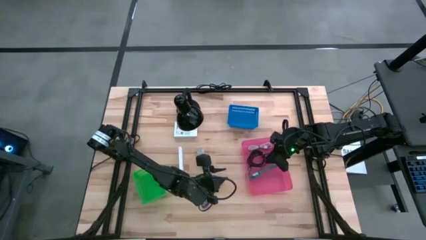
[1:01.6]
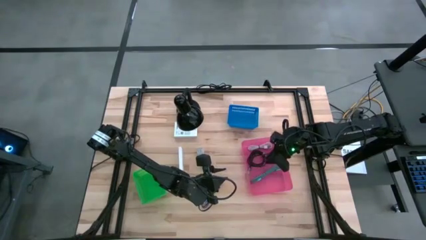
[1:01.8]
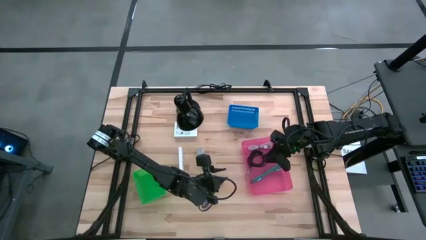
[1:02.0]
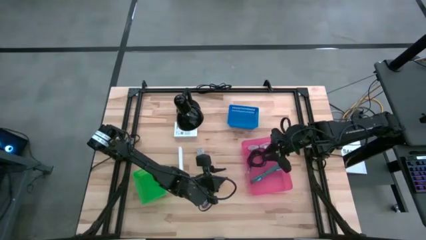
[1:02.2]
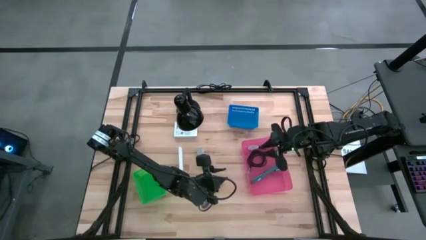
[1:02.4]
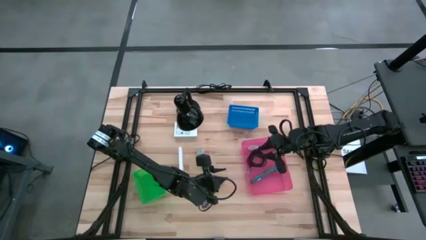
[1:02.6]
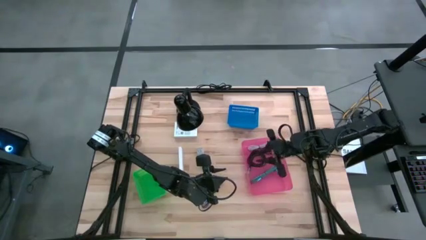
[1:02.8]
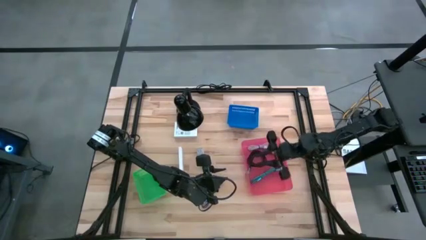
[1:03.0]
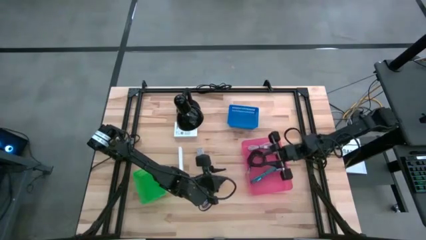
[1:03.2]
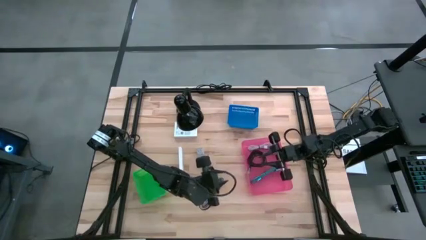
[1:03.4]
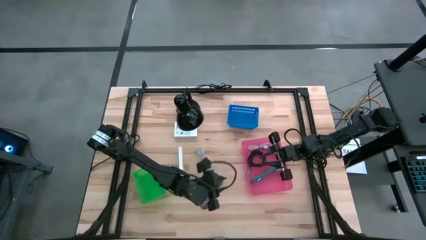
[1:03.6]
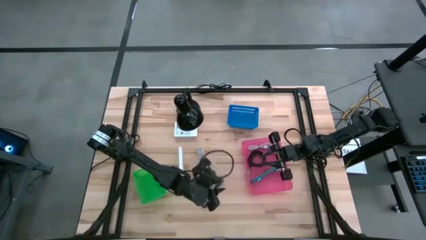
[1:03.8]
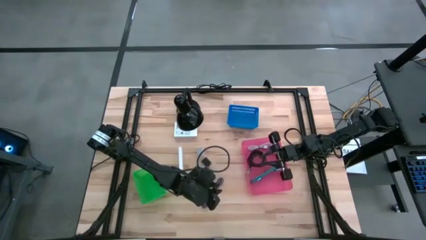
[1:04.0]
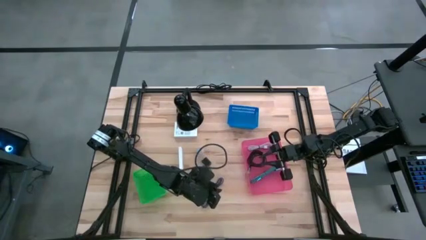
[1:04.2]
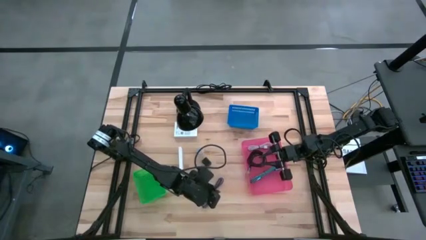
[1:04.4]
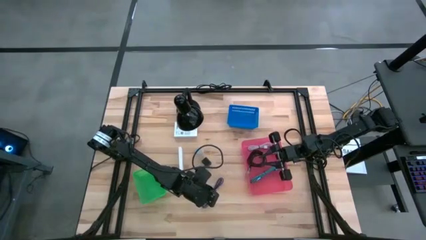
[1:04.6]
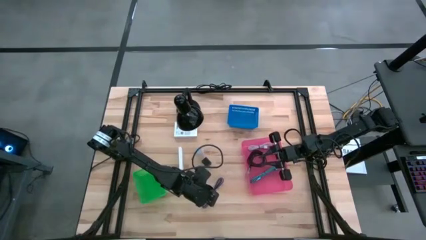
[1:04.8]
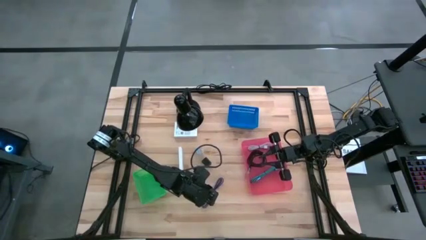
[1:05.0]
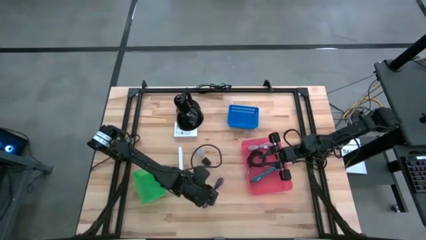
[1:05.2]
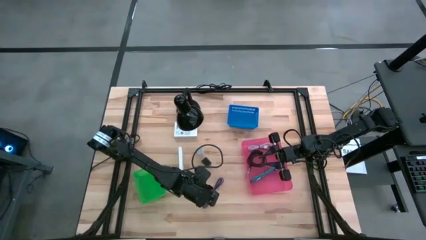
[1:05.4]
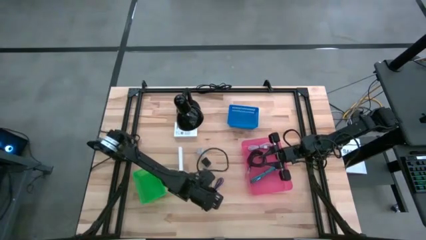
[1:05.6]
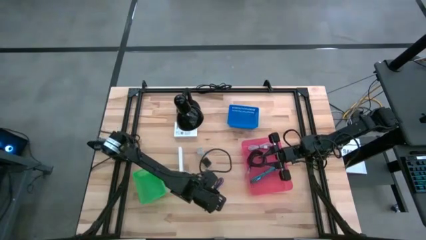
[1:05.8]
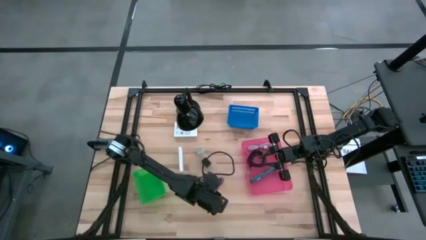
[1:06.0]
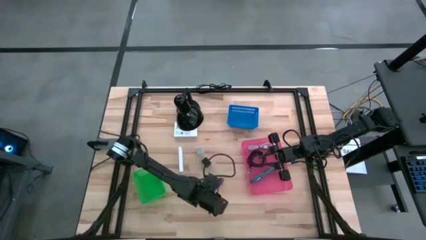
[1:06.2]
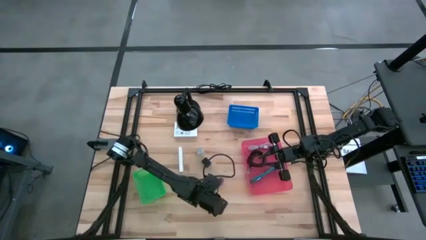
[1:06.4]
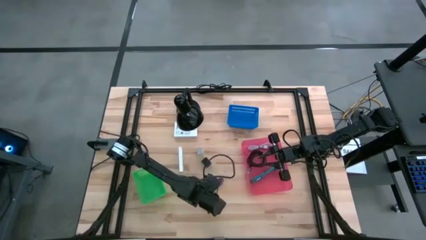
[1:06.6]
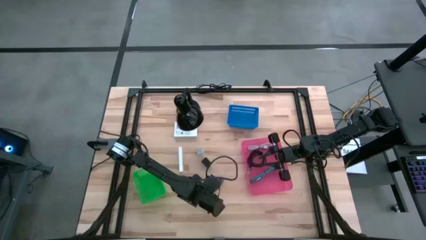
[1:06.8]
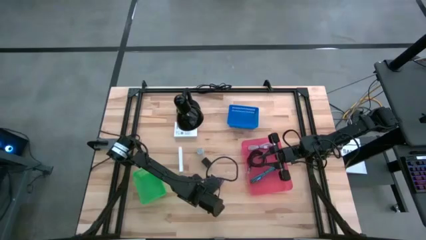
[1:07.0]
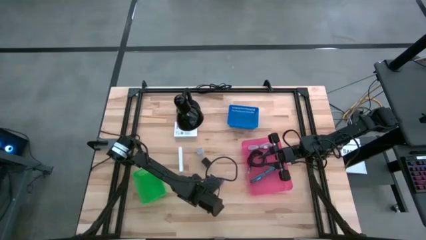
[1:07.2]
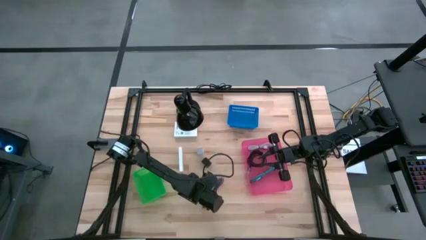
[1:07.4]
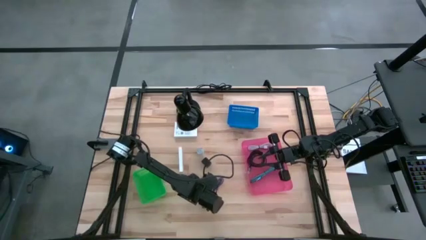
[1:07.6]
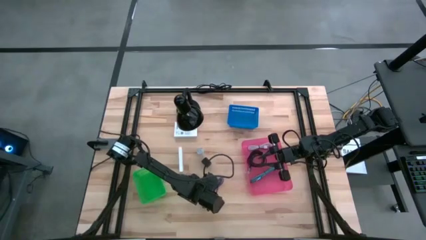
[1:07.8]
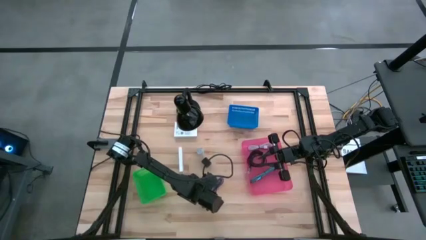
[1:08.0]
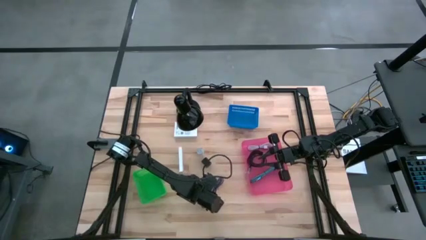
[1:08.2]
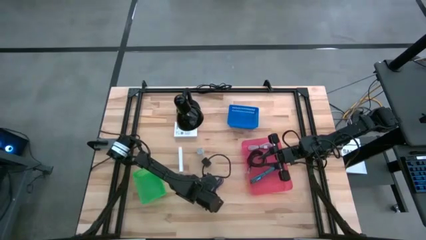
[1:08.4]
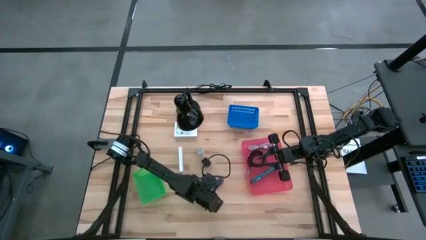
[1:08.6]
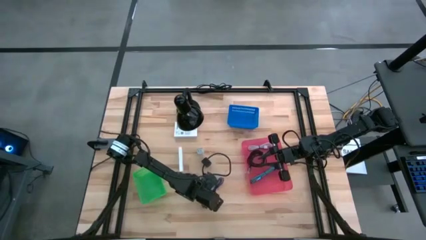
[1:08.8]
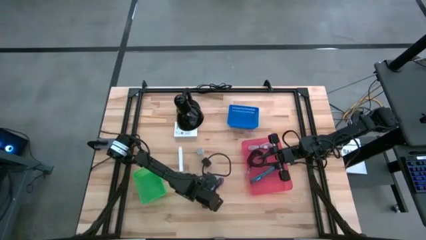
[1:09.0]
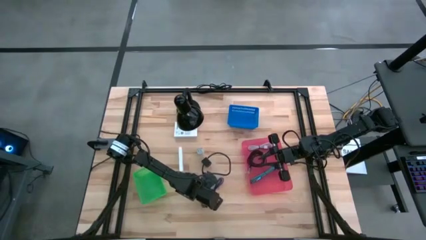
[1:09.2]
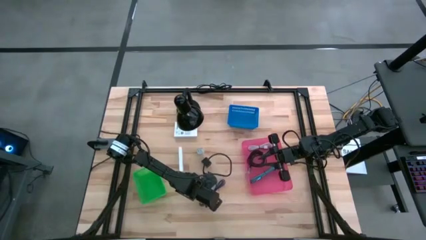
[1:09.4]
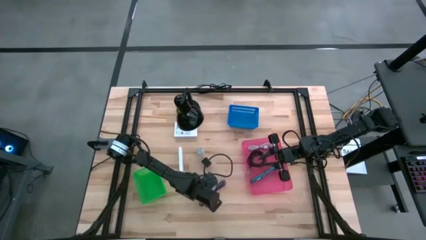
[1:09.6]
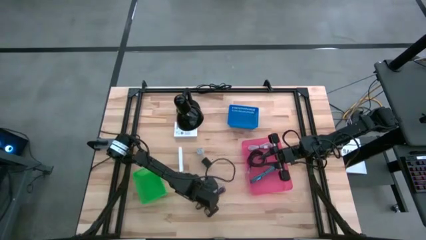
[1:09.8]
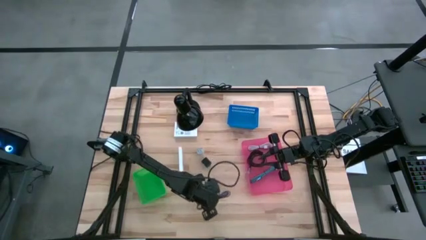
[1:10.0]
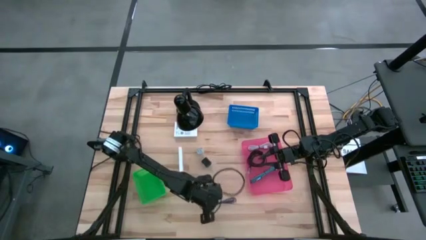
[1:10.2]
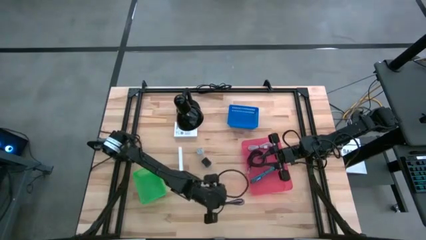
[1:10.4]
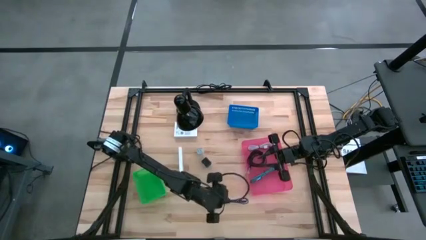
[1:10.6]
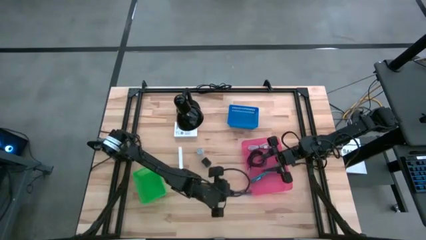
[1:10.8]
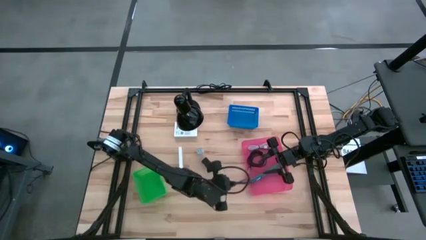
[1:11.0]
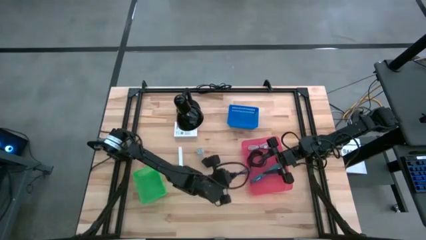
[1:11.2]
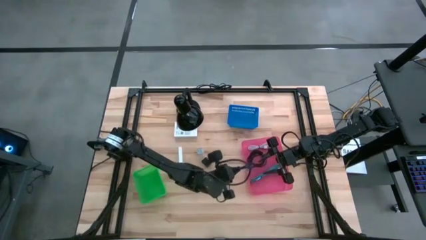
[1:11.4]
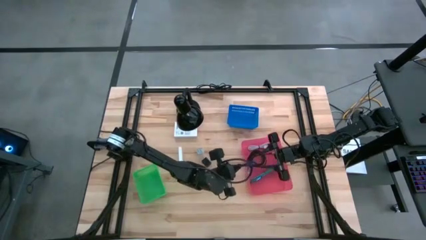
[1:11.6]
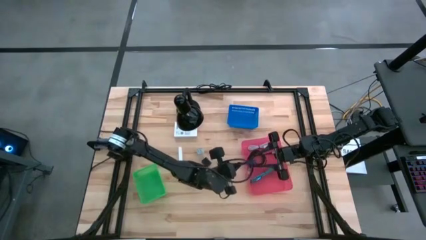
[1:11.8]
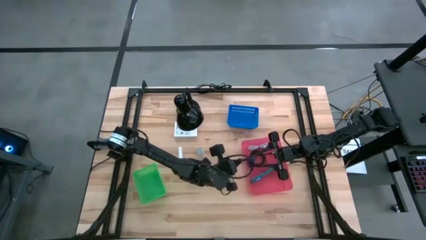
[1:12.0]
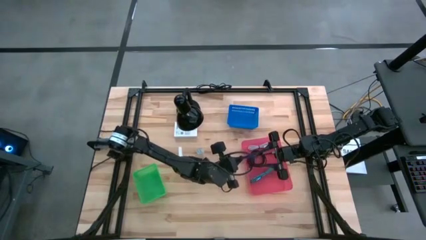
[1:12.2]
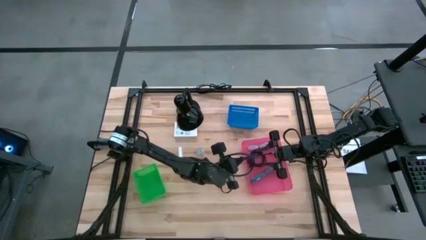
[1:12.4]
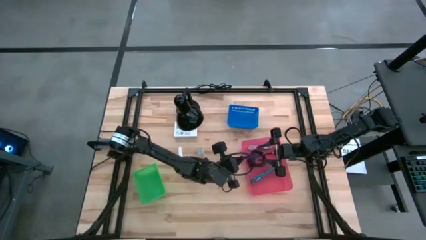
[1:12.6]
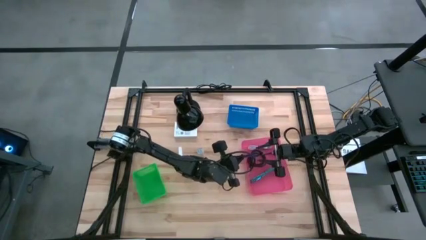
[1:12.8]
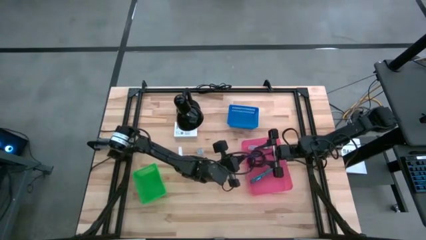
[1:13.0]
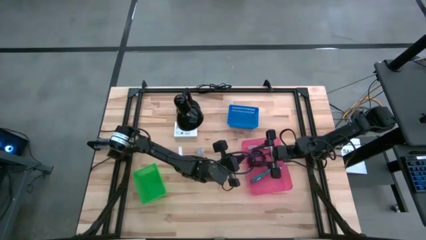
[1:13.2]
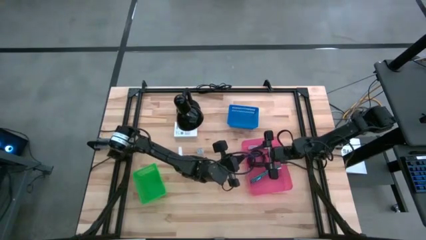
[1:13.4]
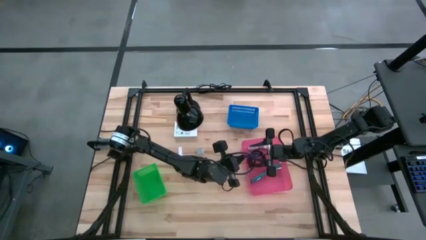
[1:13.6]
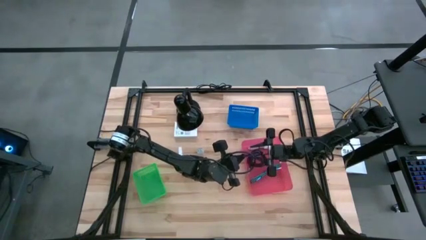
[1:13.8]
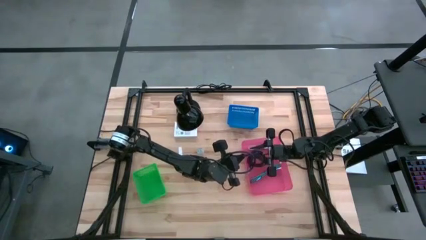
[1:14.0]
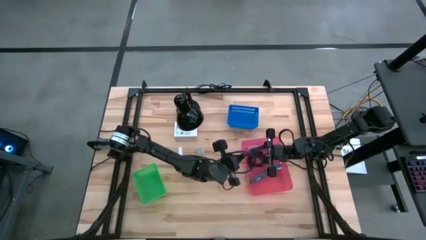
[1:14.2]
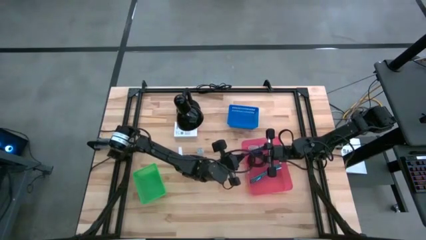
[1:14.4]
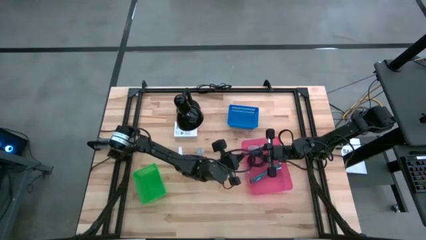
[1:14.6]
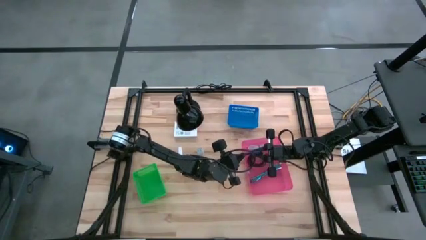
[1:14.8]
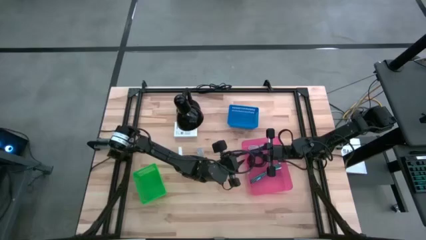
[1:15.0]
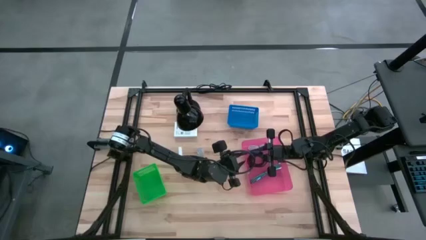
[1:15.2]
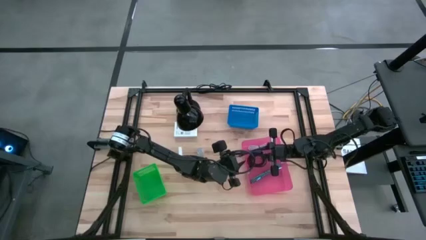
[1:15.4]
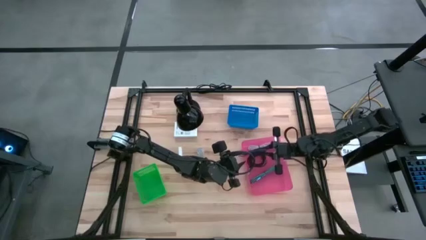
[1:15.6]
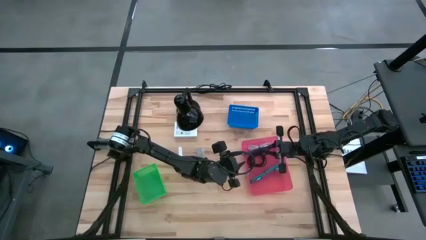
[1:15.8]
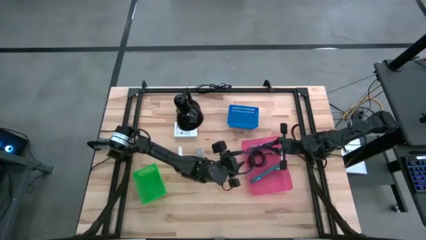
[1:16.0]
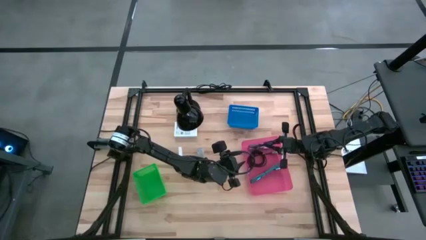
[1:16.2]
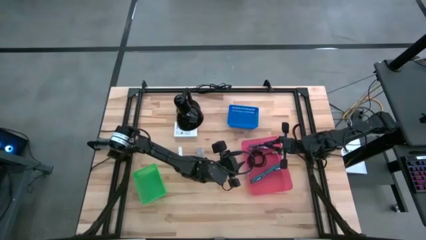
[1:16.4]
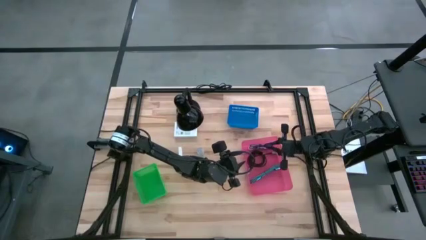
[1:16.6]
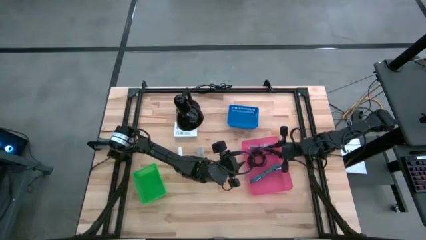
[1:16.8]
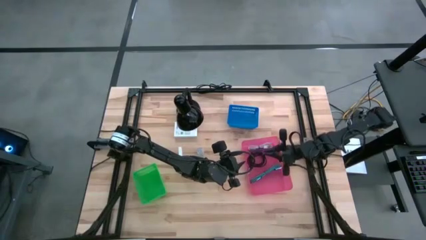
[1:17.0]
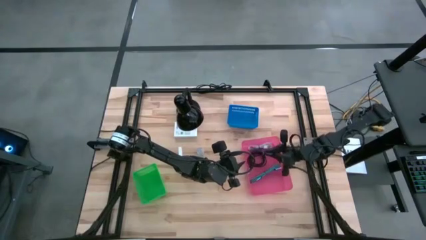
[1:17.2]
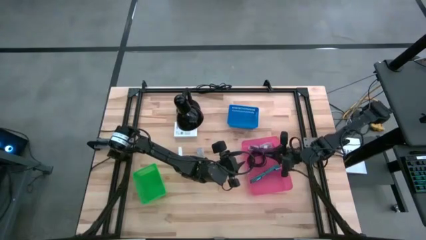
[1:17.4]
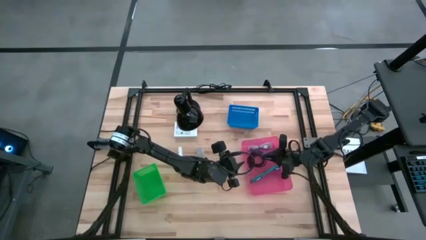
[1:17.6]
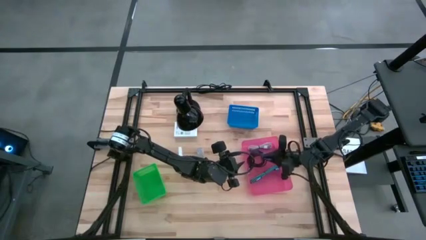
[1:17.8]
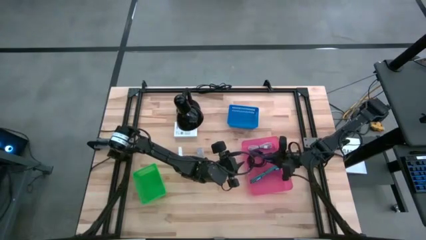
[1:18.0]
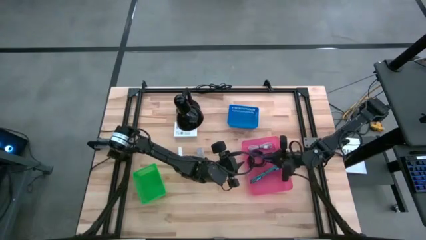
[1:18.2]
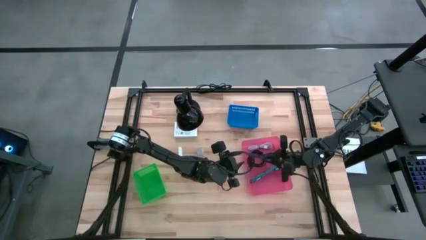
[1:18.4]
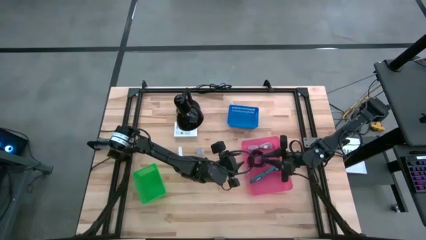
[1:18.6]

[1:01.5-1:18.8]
Task: Pick and place items into bin
Put the purple charger cable into the pink bin

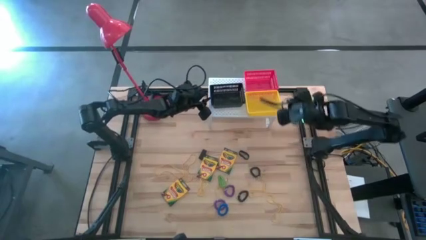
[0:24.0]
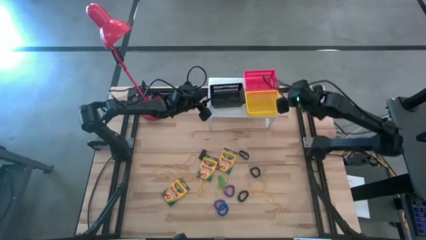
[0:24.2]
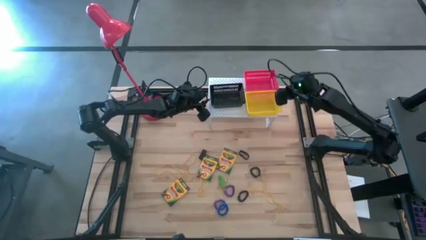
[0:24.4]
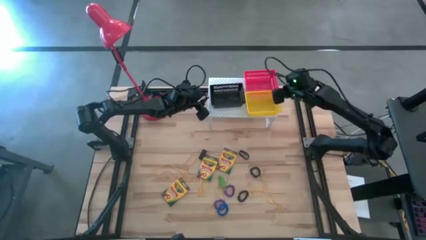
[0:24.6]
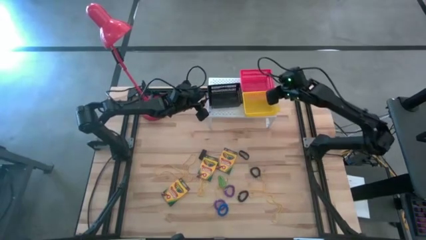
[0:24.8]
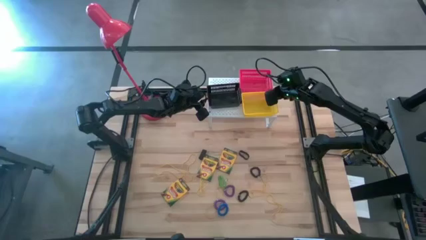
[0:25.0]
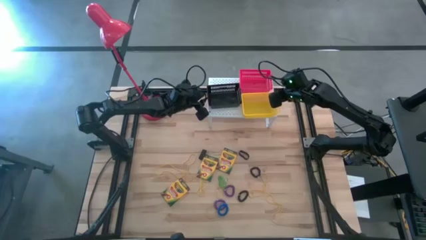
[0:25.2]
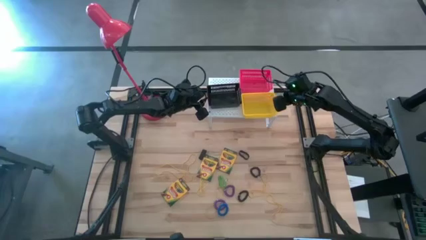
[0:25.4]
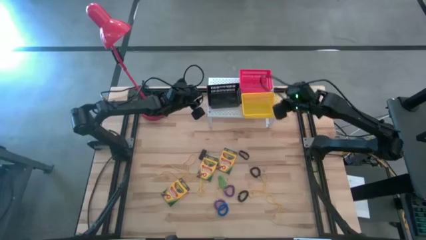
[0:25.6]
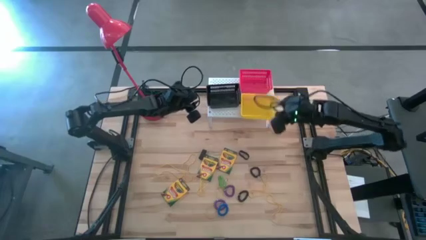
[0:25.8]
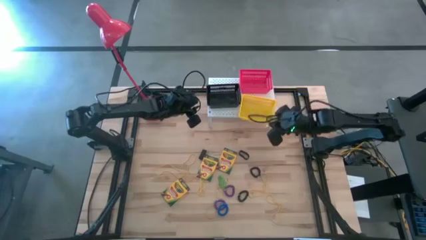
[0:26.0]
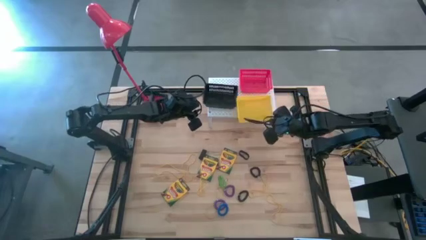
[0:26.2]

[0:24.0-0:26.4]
Task: Pick & Place Office Desk Supplies
Adjust the bins on the shelf
